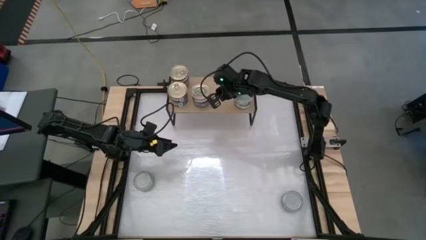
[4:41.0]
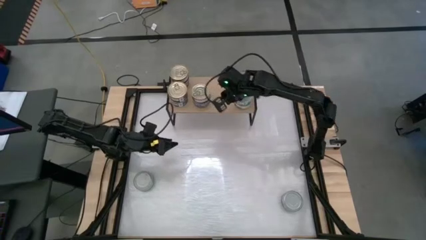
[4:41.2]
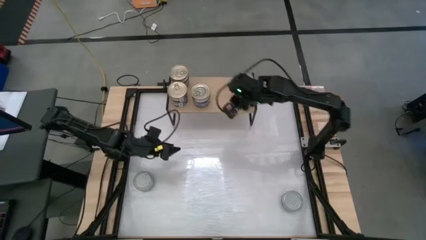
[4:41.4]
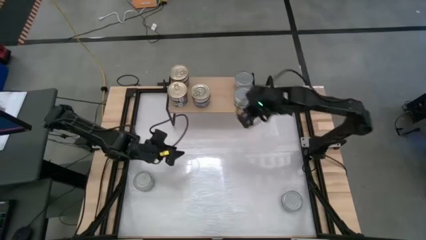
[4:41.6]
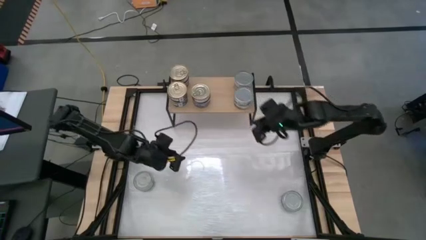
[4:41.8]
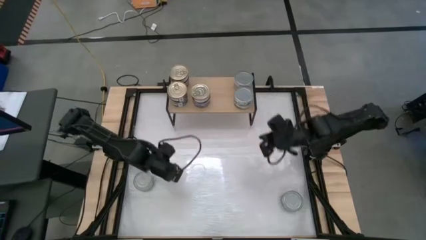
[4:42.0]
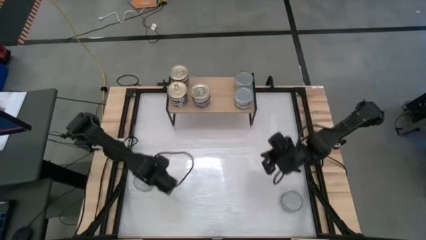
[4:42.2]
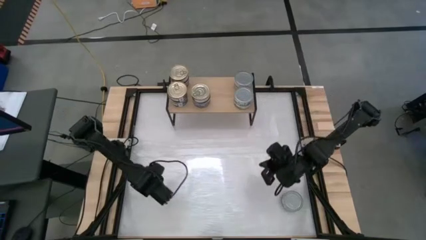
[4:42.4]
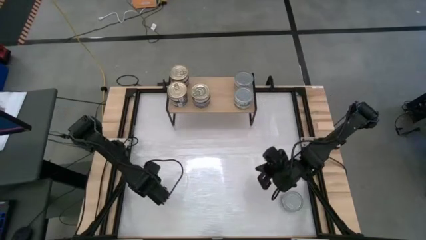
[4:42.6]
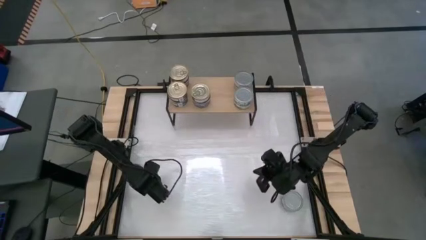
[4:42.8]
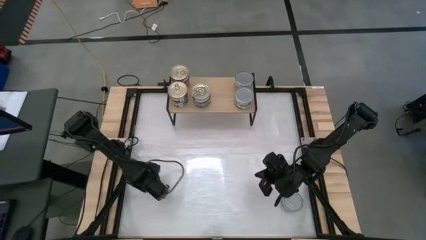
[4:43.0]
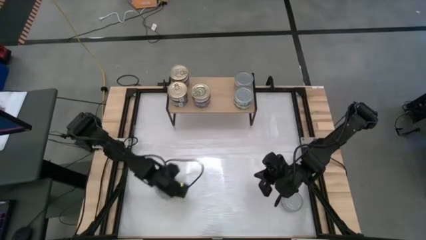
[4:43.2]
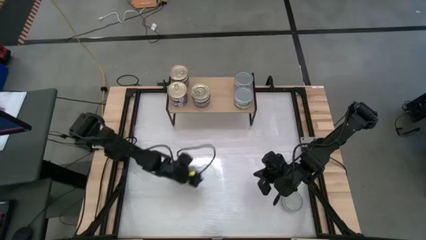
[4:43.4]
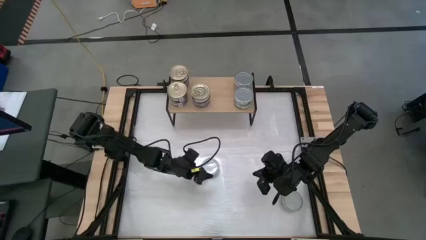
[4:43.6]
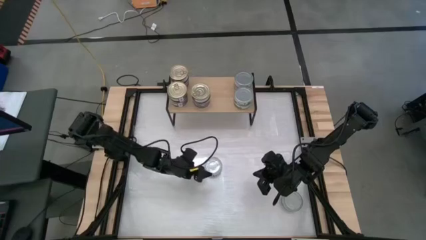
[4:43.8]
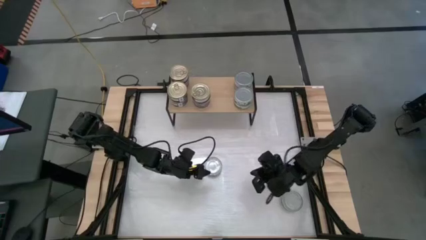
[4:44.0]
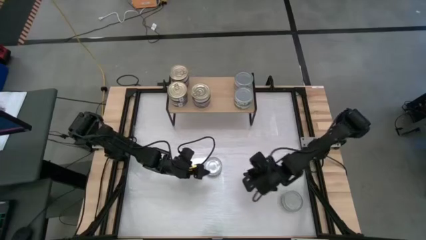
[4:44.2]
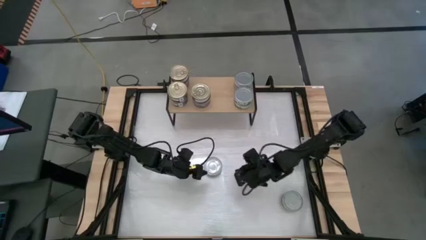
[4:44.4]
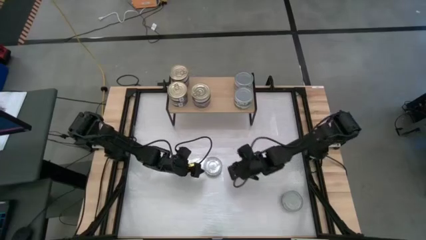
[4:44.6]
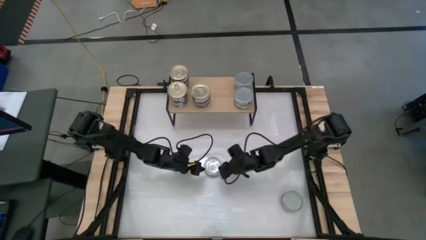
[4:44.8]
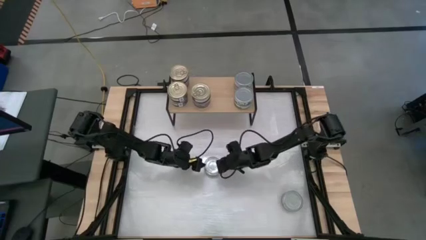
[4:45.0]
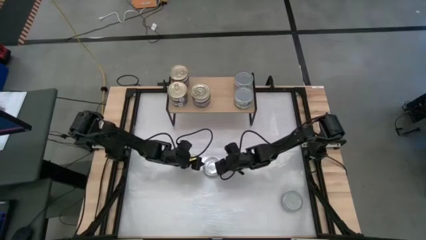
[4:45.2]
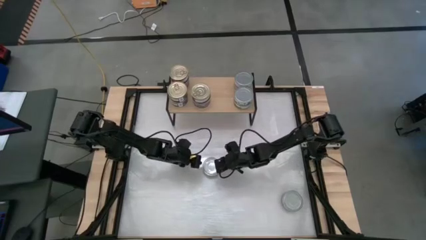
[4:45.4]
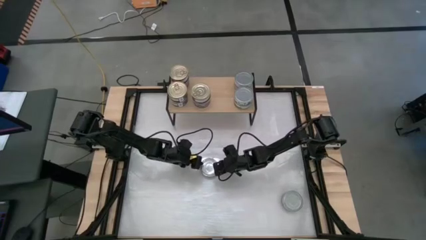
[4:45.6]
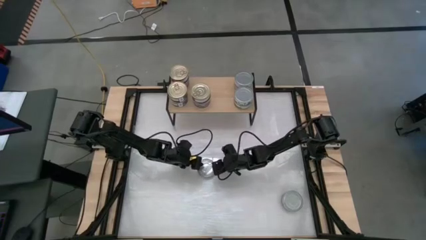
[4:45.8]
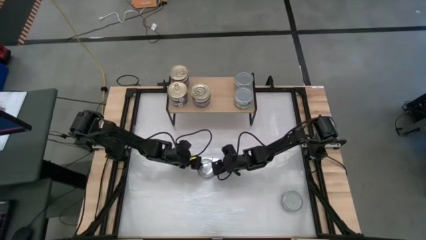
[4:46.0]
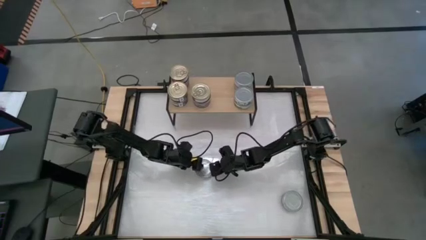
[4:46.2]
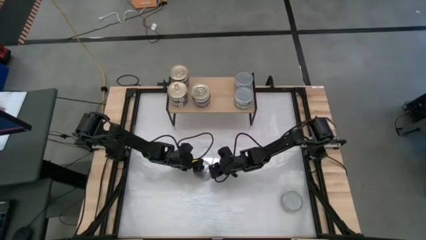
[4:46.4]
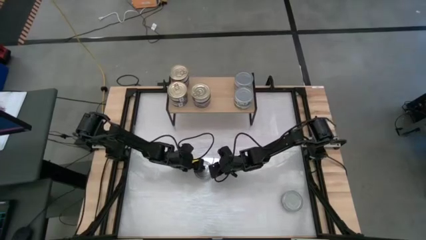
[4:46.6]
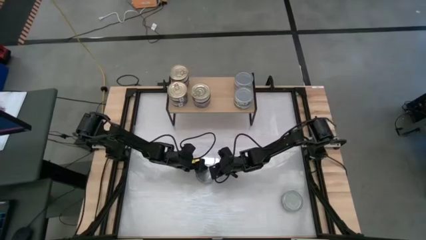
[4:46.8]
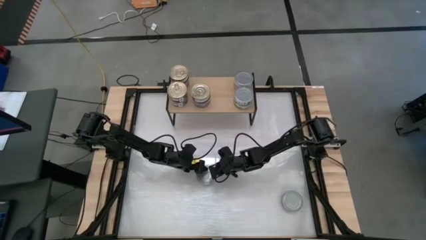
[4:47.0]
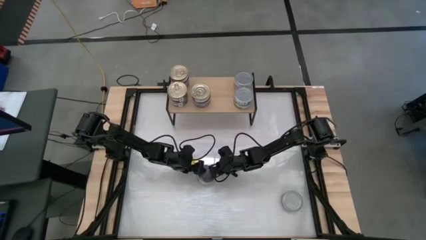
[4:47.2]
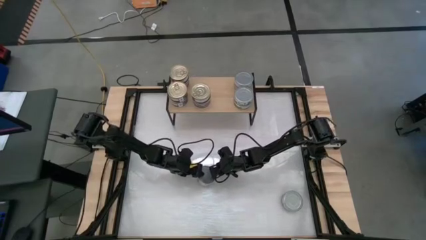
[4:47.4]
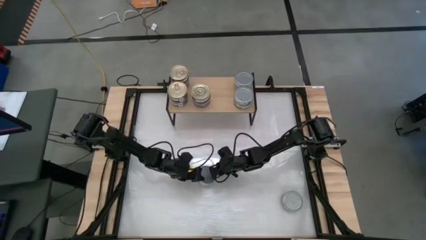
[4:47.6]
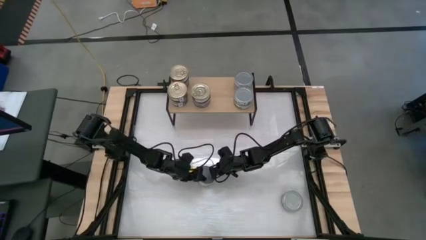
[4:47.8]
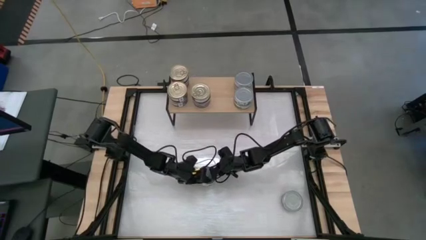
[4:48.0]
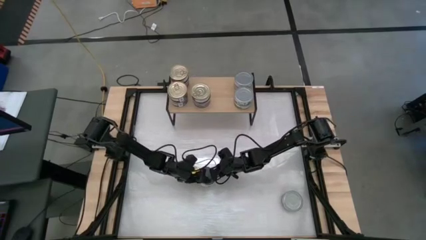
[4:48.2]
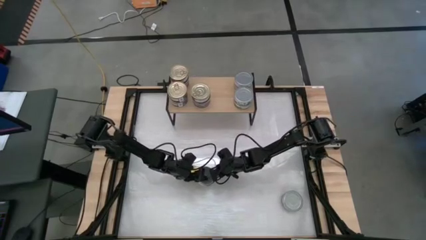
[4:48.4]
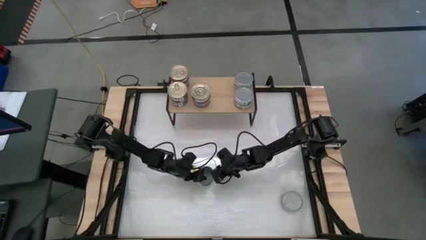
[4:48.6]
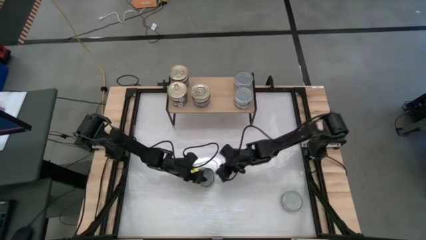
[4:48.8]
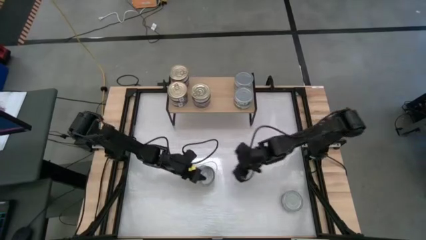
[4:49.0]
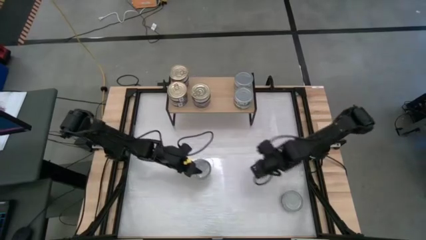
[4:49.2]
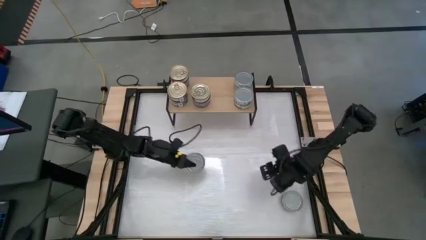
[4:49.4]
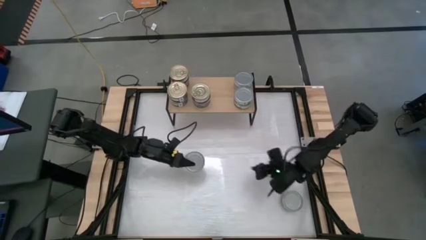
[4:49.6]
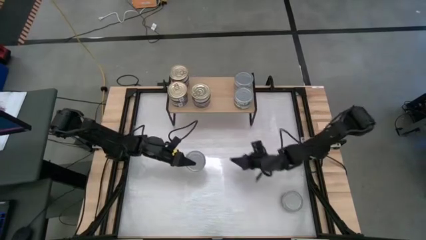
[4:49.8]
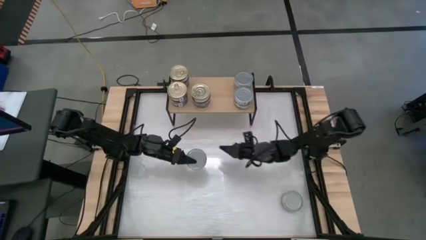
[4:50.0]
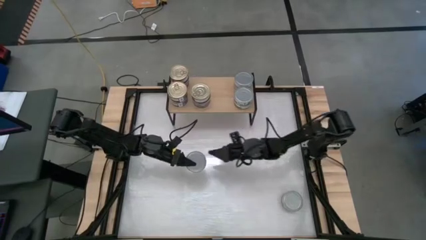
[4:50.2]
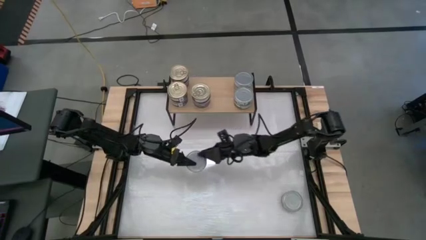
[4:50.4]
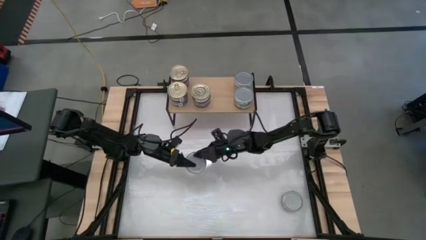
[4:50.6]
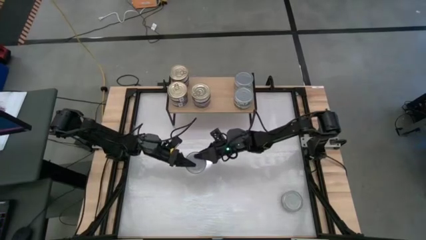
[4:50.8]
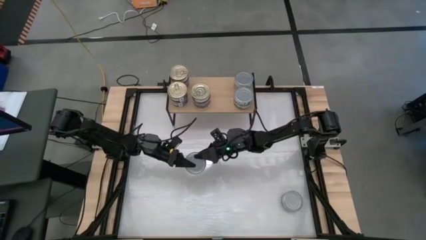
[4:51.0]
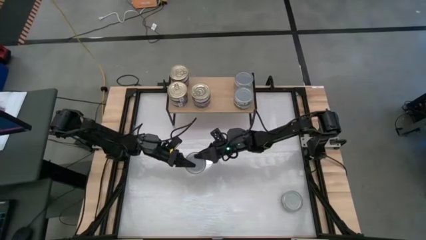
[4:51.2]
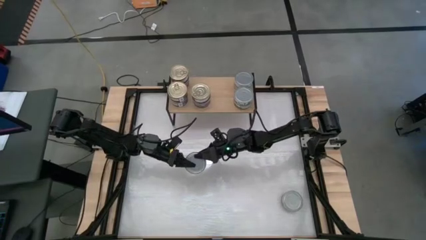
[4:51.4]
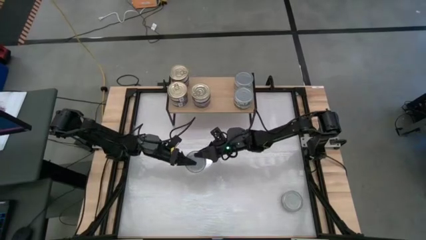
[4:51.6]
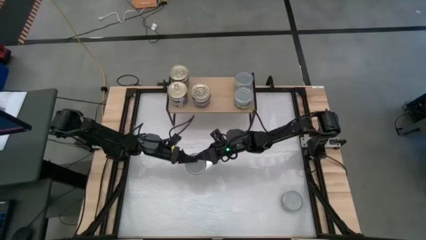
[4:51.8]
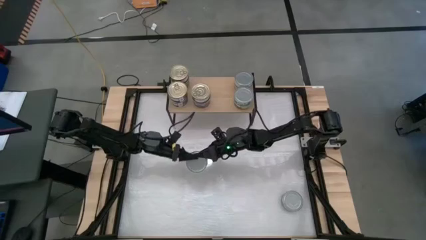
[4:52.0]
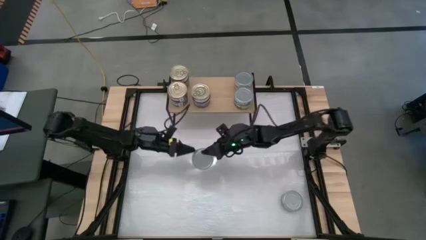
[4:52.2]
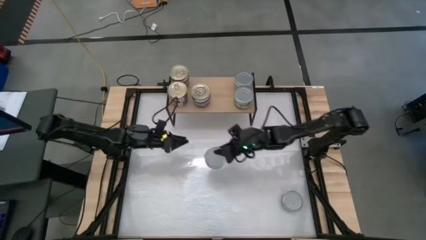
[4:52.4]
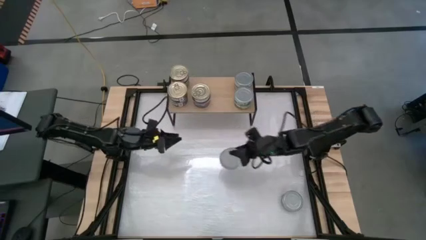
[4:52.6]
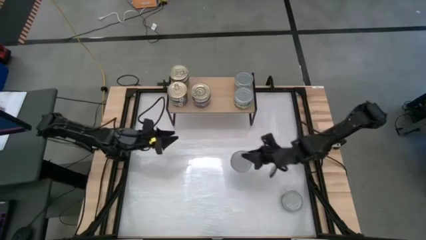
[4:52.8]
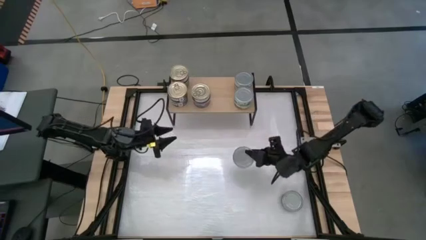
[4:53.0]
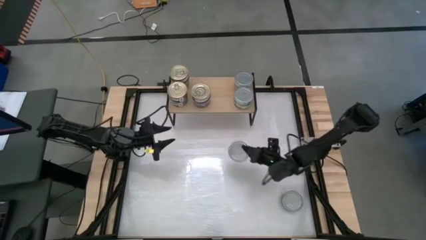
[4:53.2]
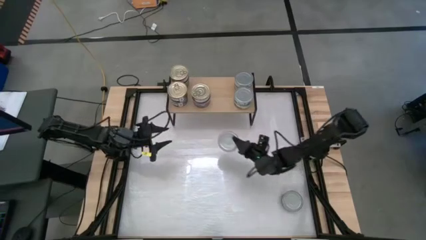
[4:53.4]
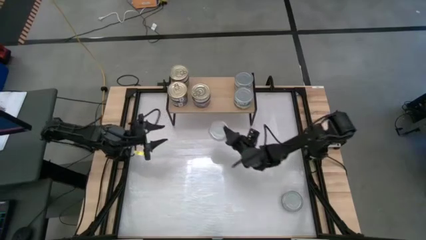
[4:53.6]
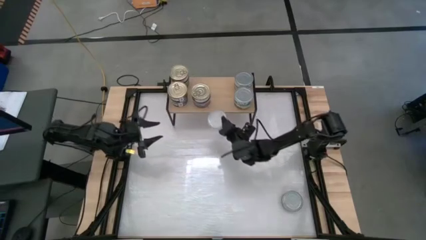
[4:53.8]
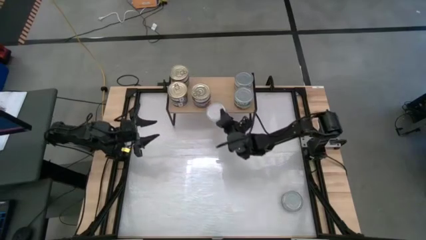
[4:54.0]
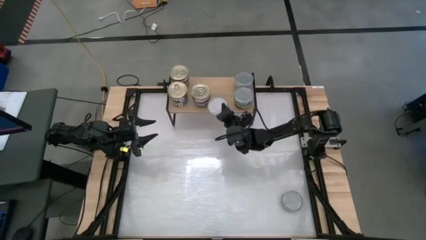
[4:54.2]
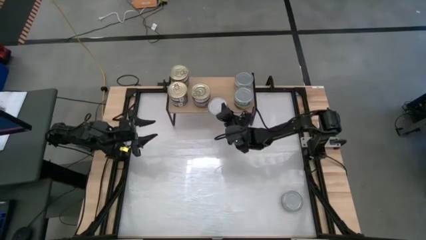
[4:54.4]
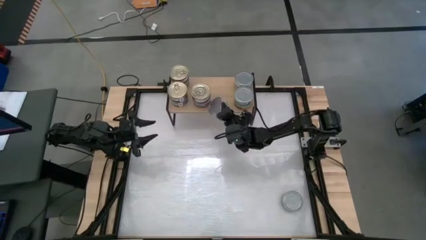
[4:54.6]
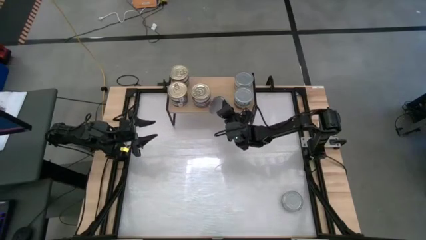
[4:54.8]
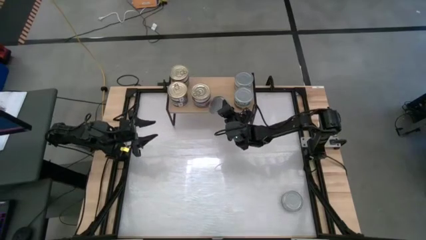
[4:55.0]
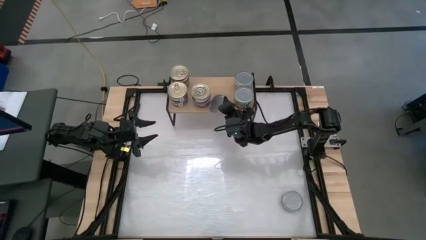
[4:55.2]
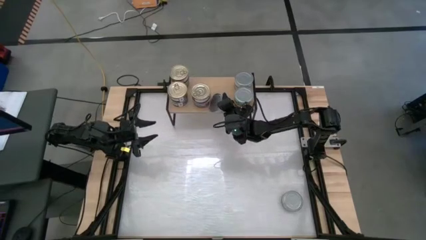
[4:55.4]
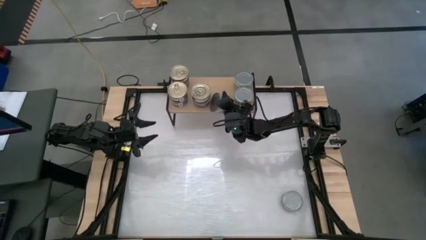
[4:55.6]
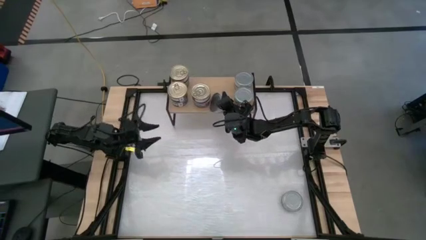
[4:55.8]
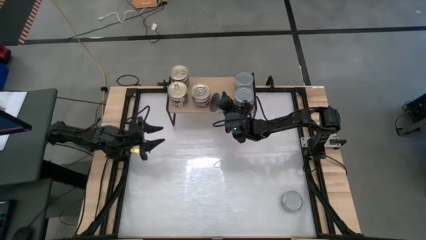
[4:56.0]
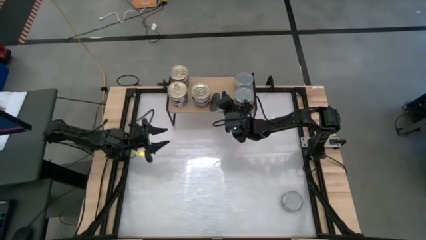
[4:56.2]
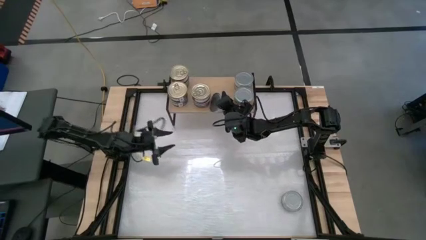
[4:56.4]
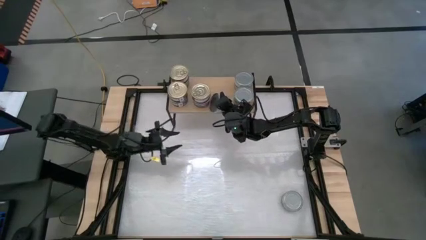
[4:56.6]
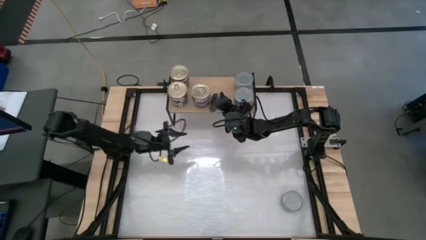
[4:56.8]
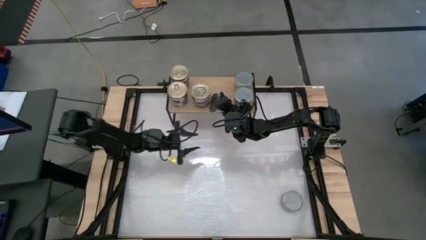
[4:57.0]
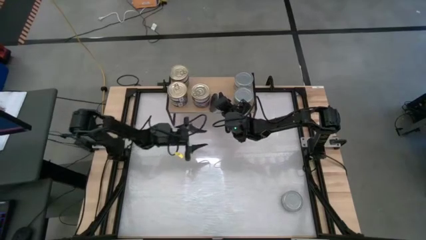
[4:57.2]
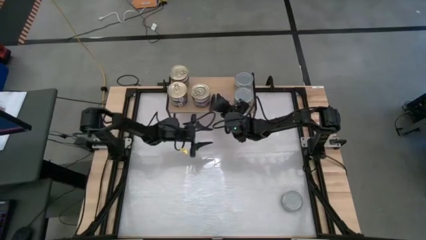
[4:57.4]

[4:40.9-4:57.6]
Task: Stack canned seafood by type on shelf
Put the green white tuna can on the shelf
